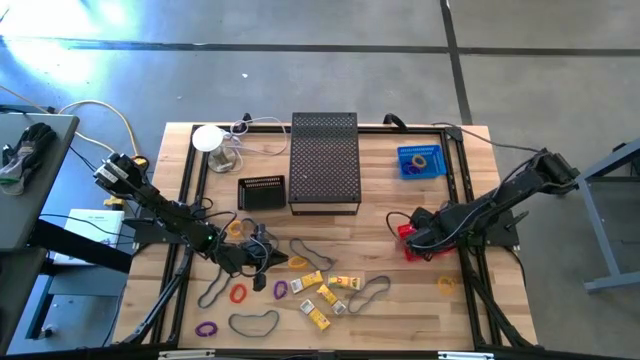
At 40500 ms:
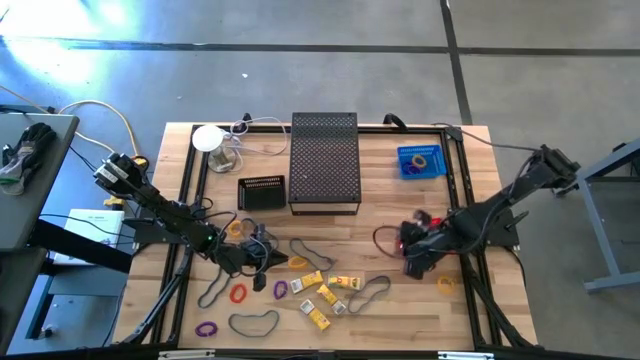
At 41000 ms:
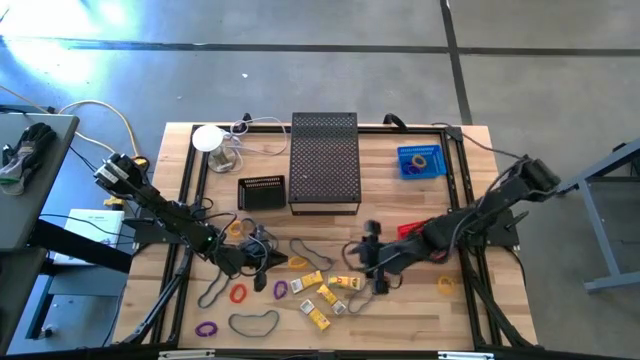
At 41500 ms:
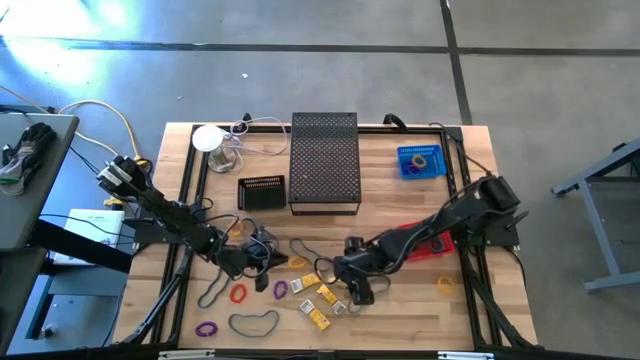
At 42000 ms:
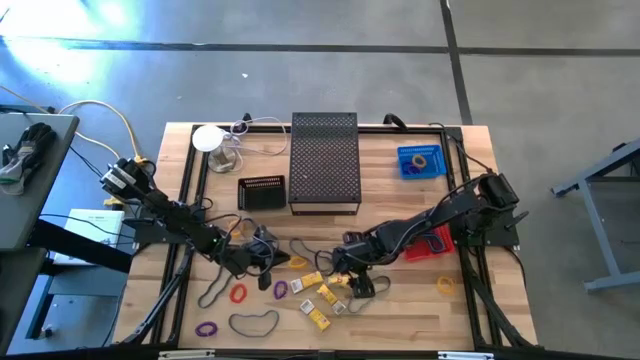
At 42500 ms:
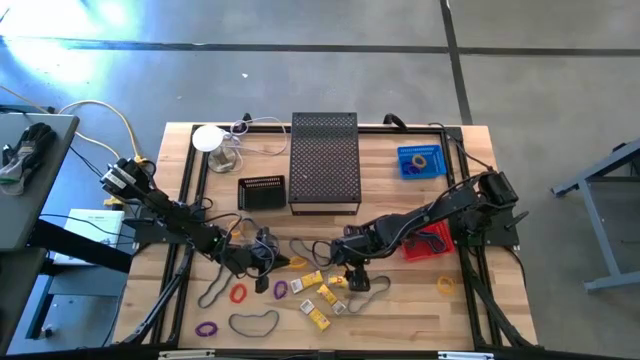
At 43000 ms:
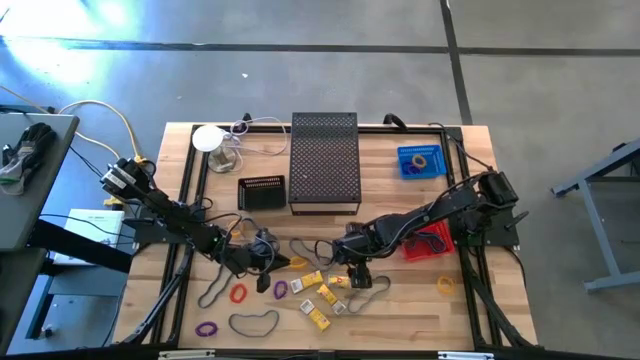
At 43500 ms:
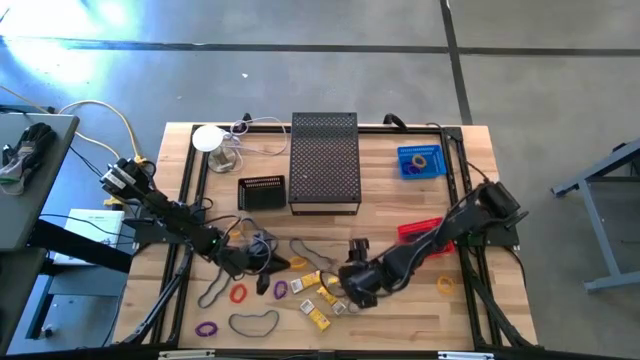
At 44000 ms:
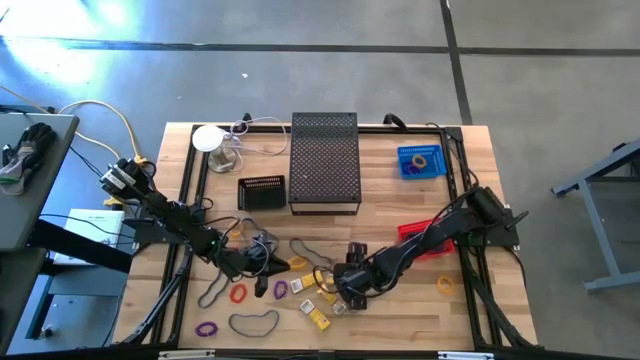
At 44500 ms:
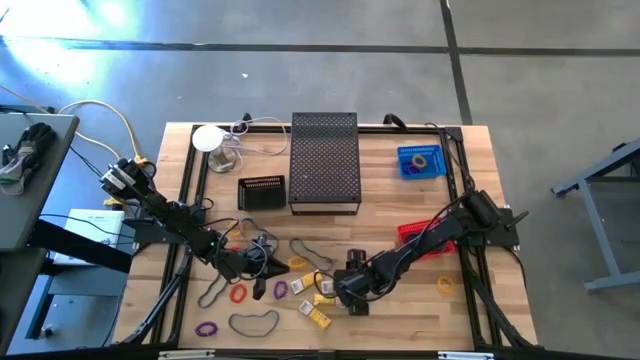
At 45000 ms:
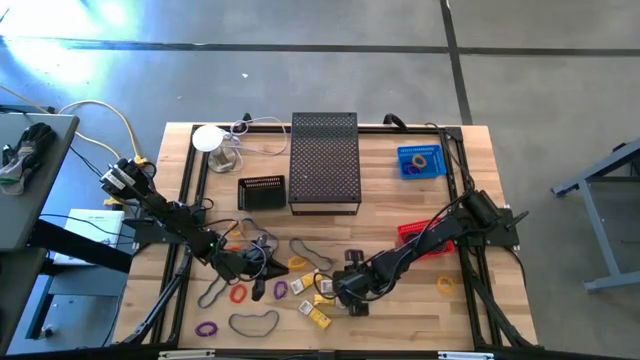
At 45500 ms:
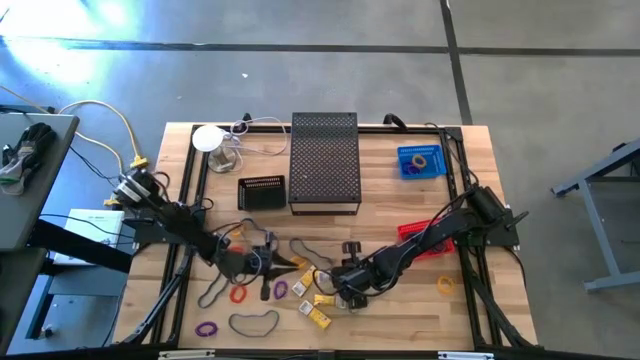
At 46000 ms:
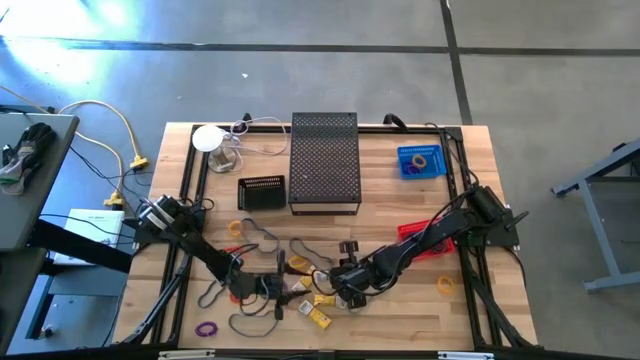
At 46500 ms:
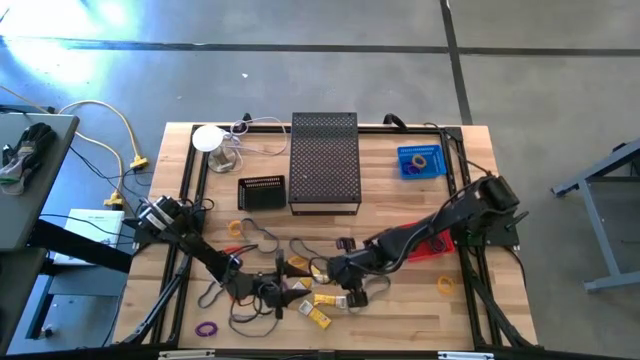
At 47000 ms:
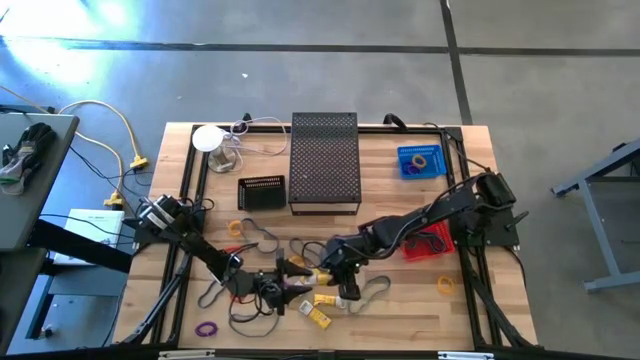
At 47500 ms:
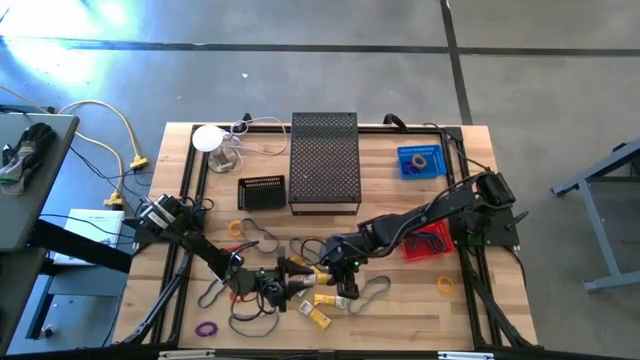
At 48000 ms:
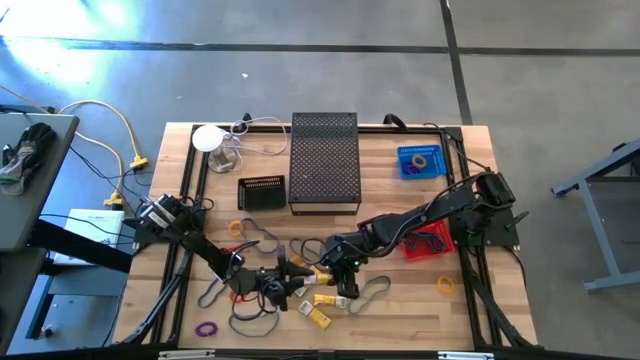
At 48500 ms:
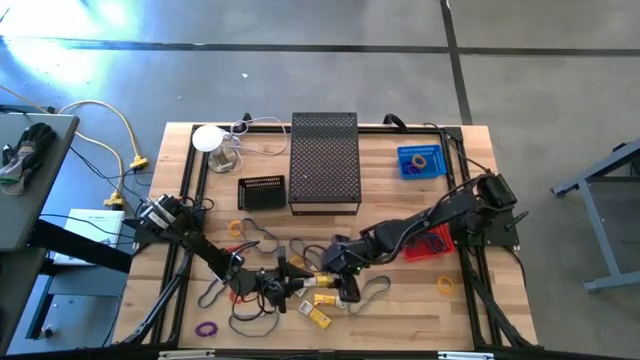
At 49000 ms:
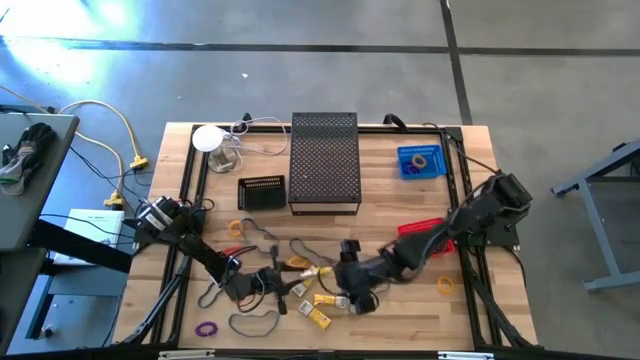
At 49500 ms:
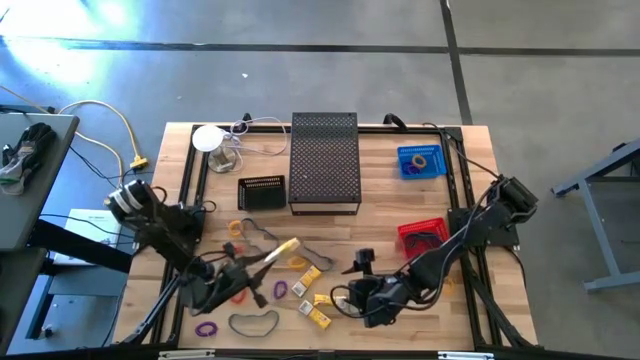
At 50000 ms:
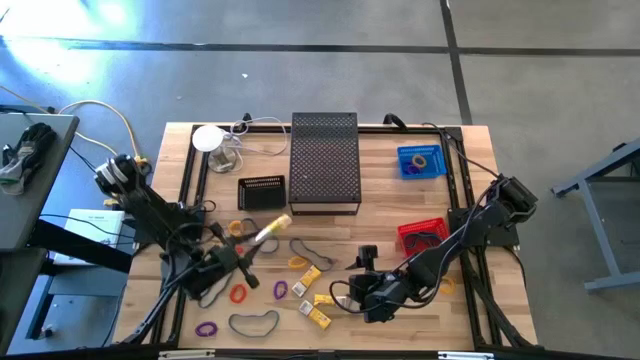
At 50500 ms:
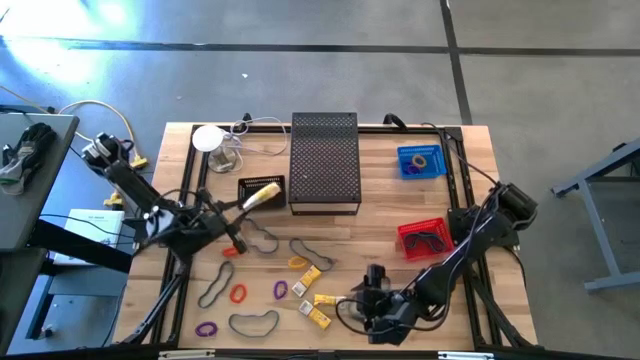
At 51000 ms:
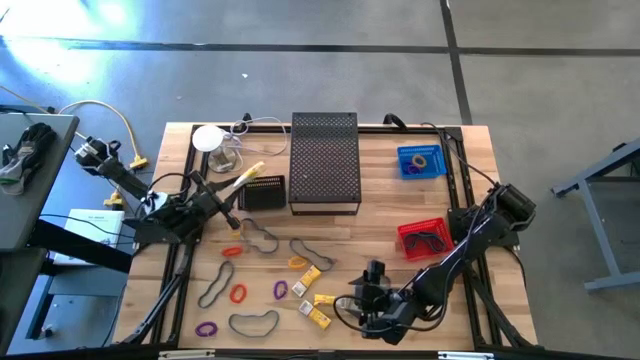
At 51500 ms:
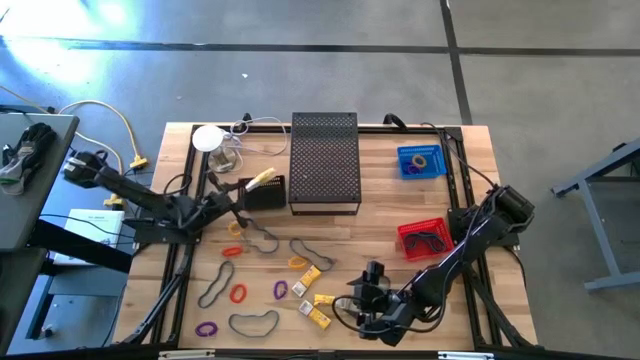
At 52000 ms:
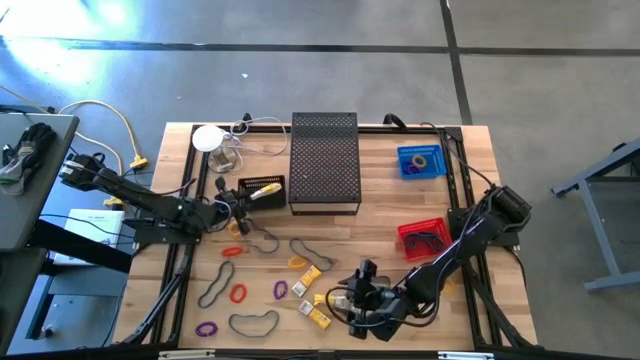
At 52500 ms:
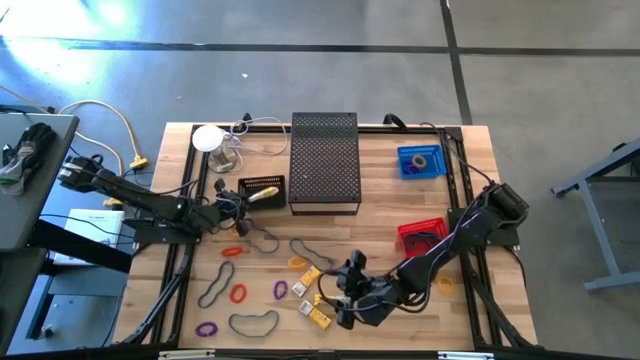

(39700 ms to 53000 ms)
Task: Pick & Place Office Desk Supplies
Put the yellow crayon box into the black bin

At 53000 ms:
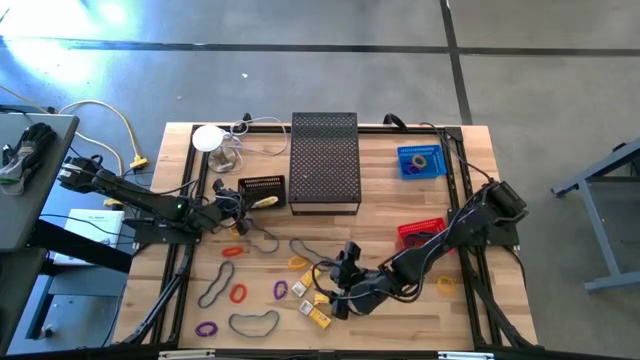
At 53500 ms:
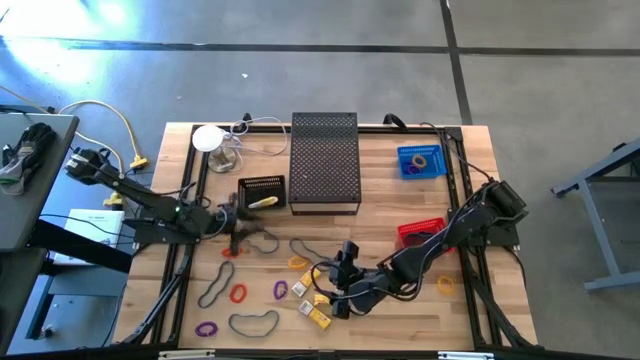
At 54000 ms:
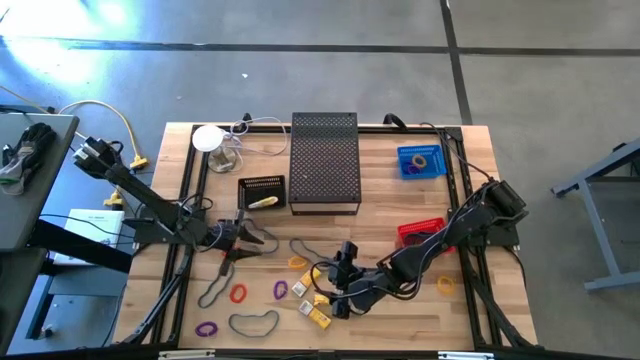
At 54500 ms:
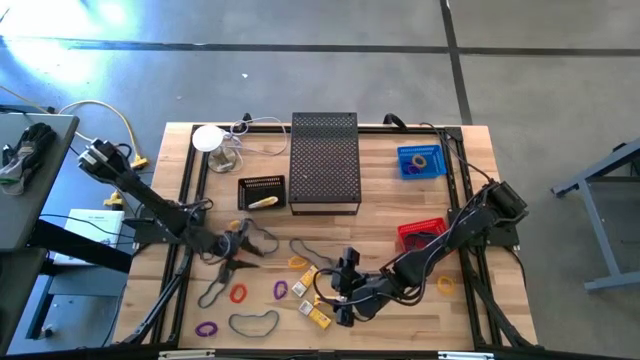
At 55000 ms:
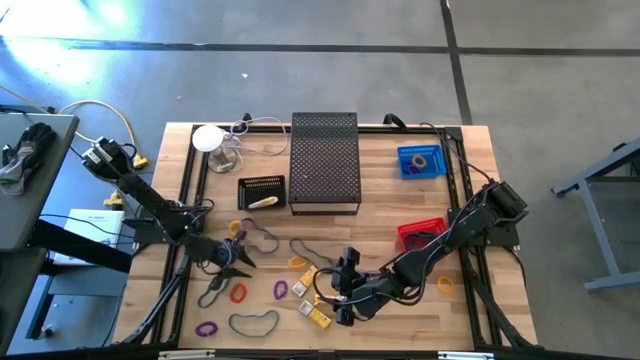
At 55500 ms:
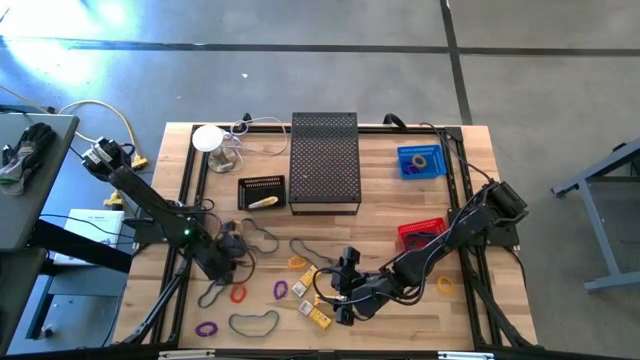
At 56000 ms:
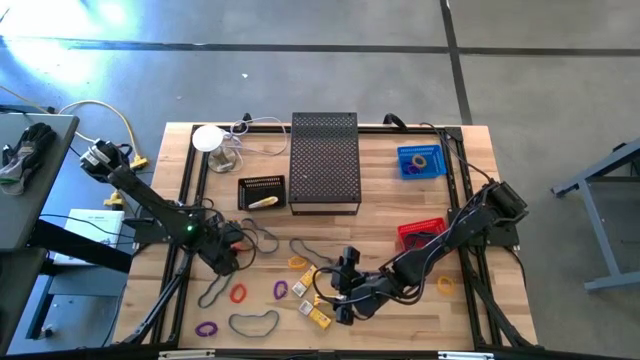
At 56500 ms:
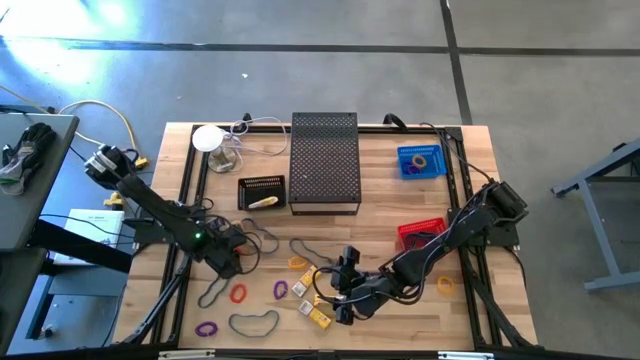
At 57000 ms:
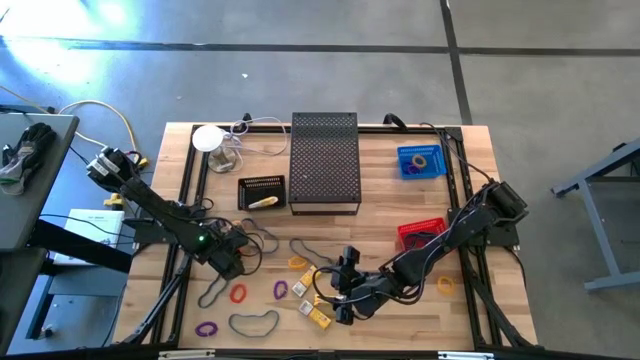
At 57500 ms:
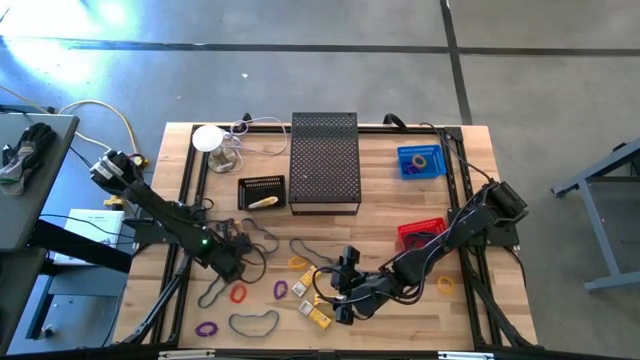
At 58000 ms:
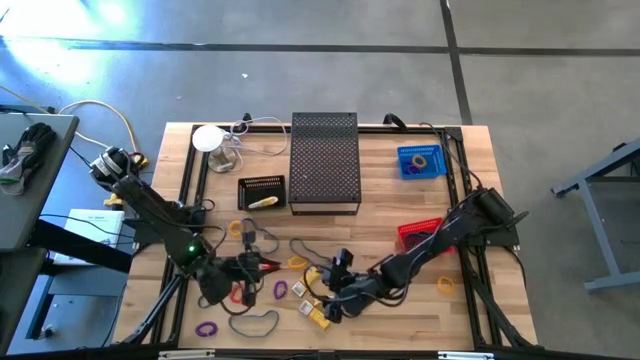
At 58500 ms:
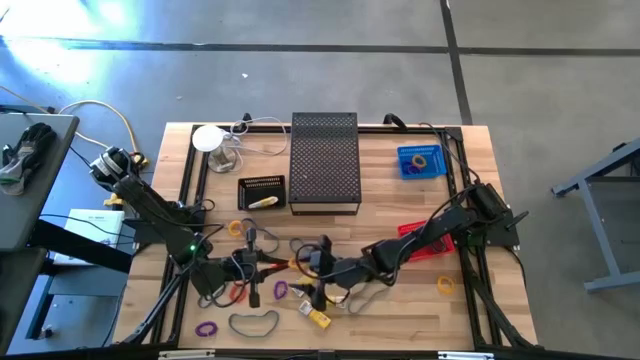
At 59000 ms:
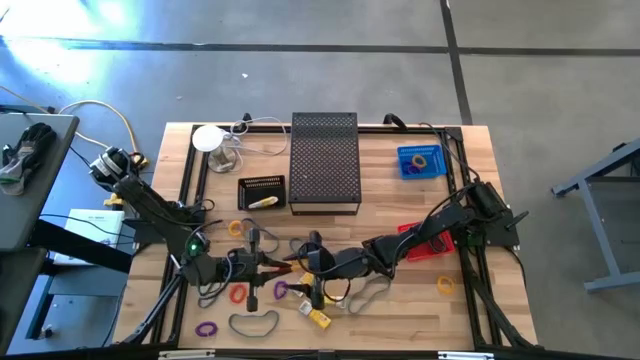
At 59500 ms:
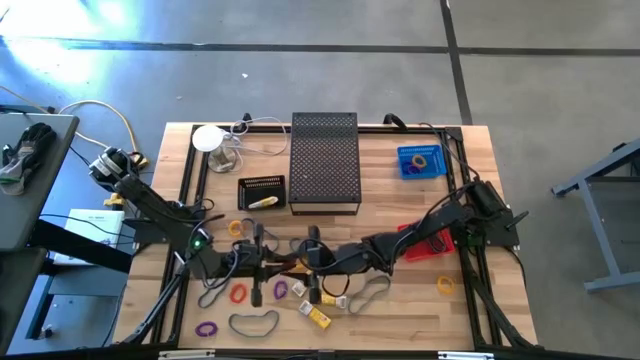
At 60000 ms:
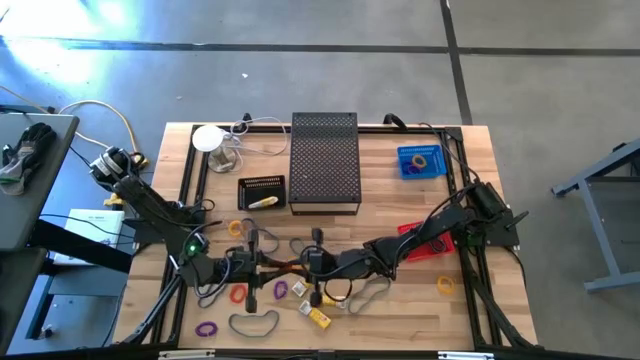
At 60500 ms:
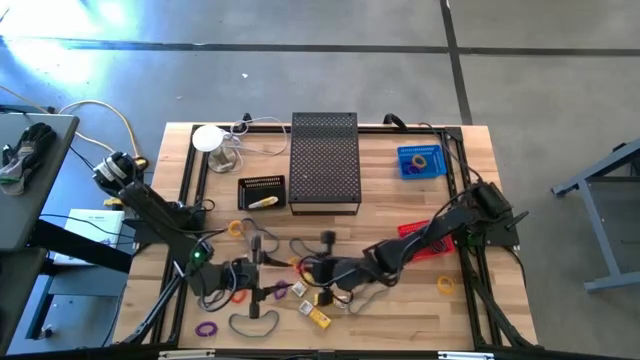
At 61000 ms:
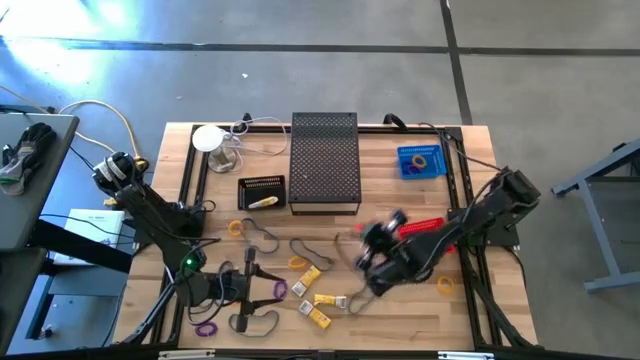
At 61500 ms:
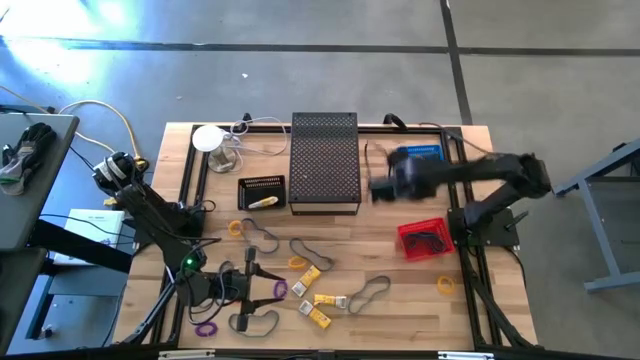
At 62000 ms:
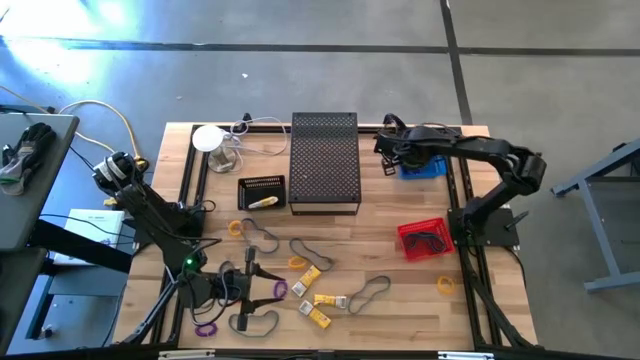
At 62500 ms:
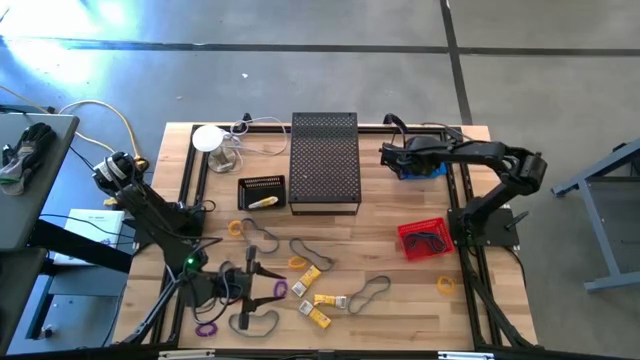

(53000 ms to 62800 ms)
Put the orange spring keychain into the blue bin
